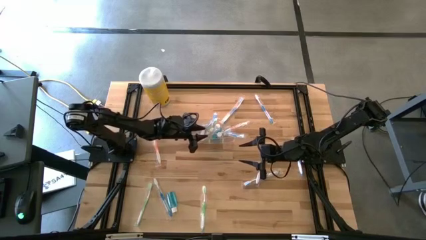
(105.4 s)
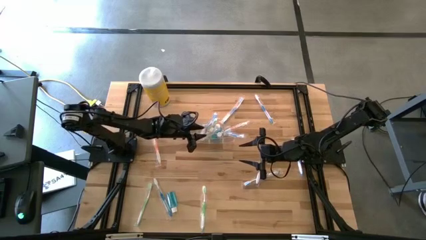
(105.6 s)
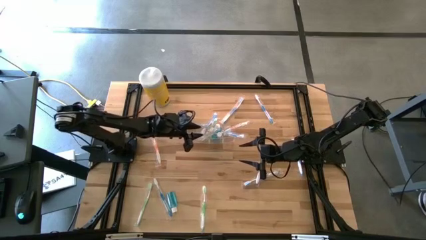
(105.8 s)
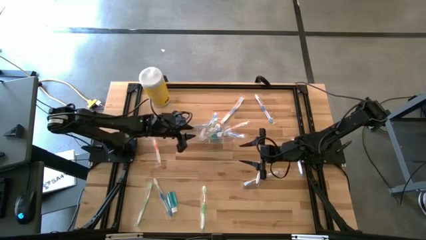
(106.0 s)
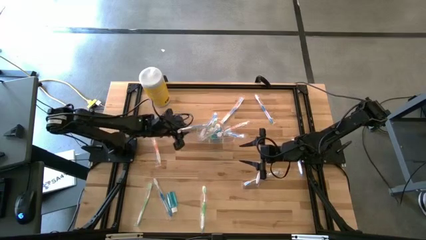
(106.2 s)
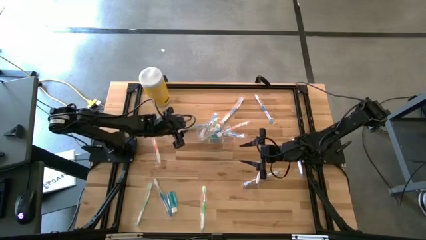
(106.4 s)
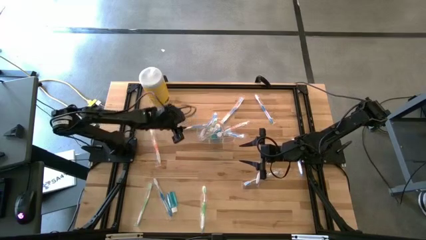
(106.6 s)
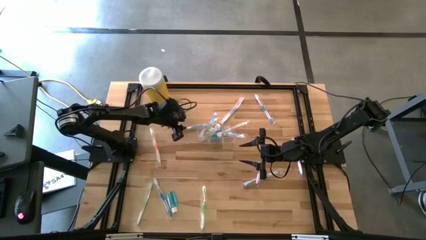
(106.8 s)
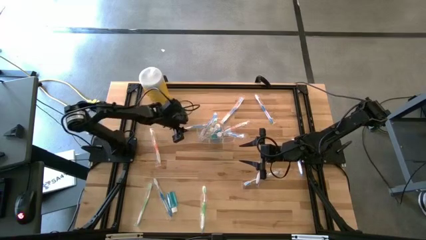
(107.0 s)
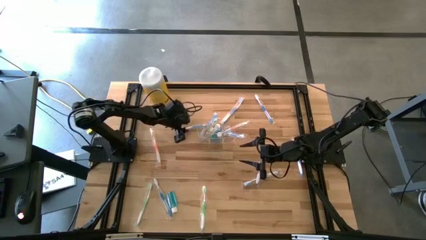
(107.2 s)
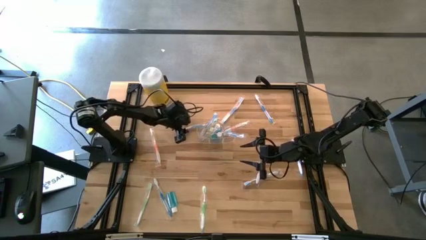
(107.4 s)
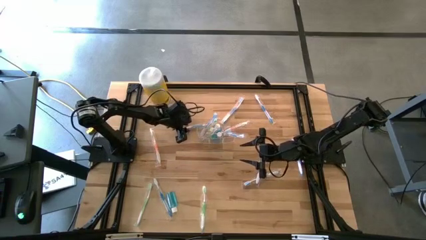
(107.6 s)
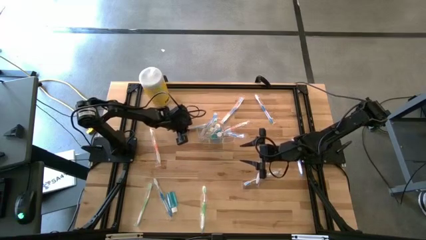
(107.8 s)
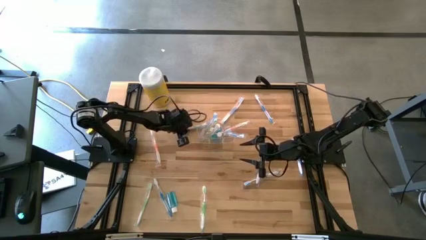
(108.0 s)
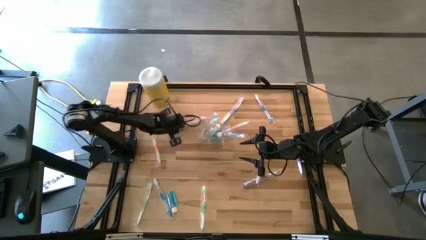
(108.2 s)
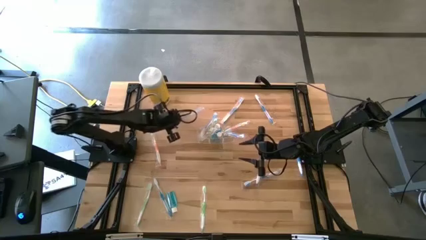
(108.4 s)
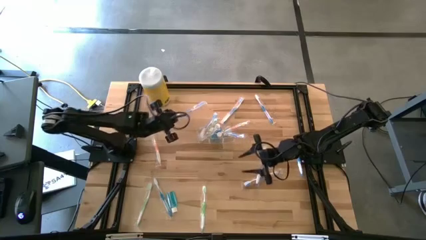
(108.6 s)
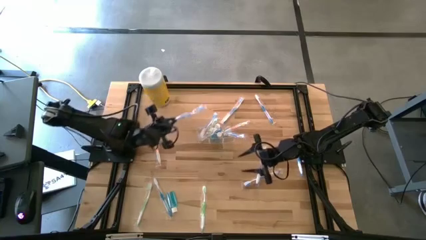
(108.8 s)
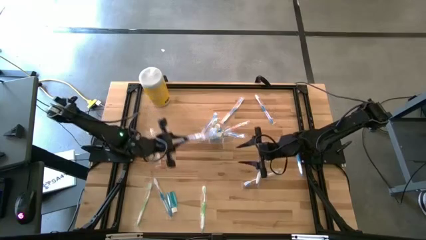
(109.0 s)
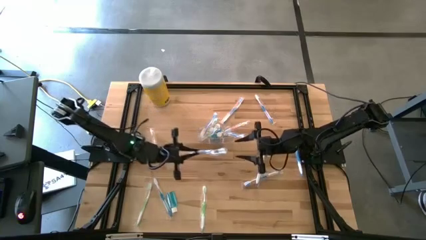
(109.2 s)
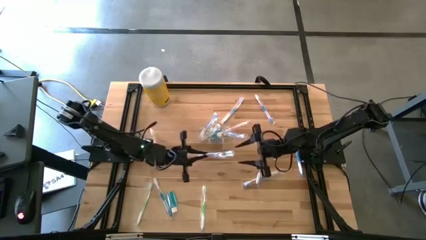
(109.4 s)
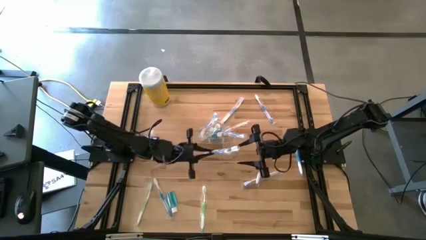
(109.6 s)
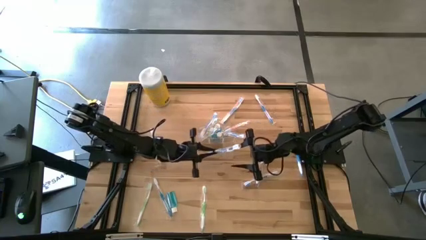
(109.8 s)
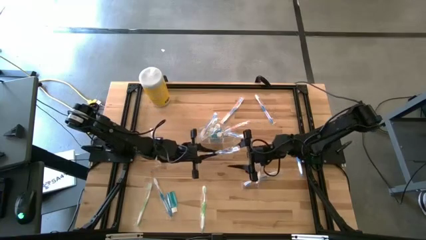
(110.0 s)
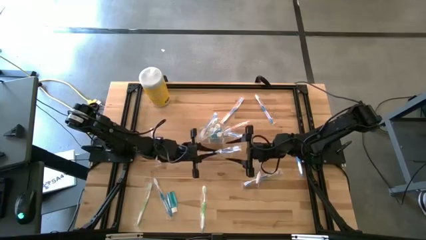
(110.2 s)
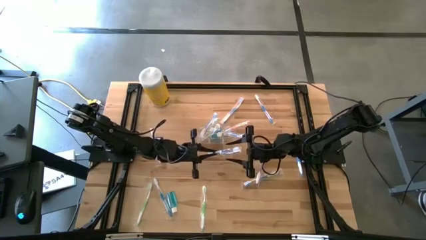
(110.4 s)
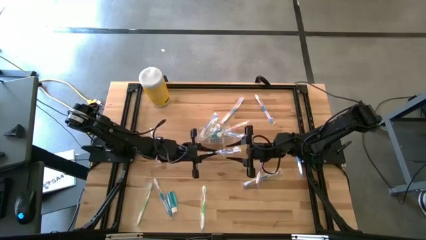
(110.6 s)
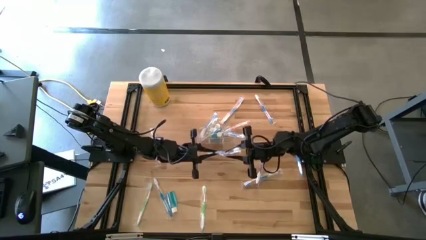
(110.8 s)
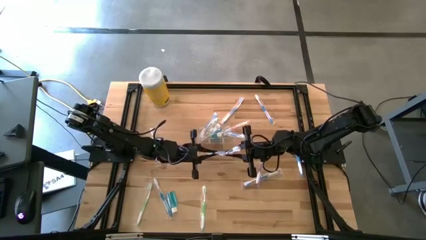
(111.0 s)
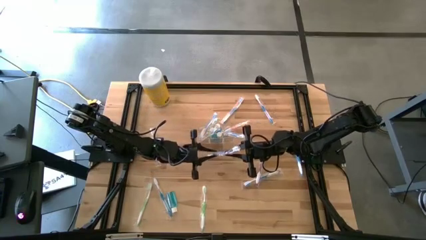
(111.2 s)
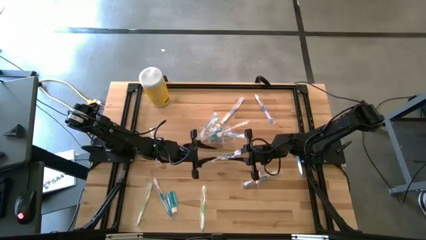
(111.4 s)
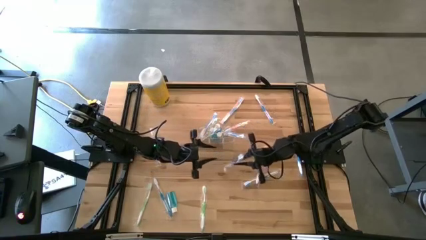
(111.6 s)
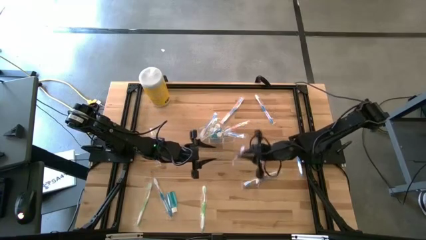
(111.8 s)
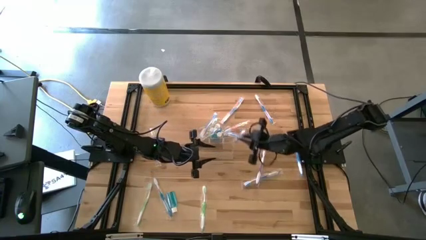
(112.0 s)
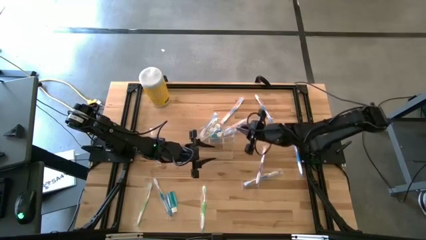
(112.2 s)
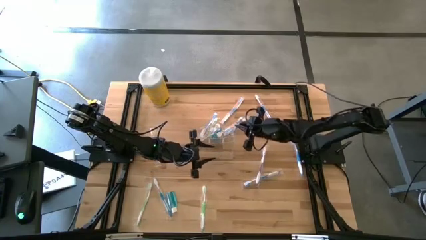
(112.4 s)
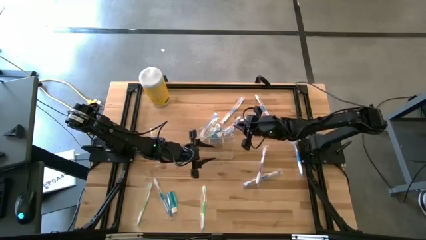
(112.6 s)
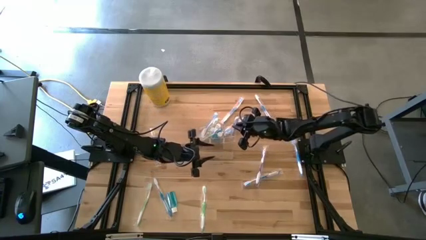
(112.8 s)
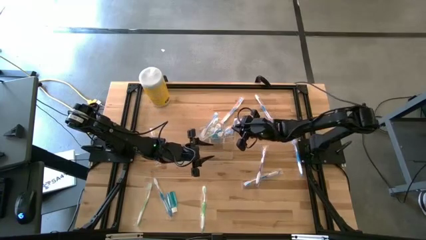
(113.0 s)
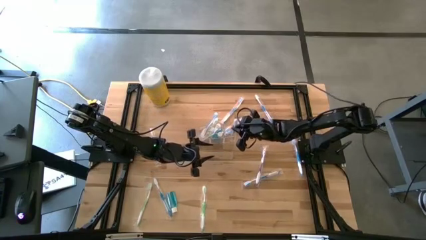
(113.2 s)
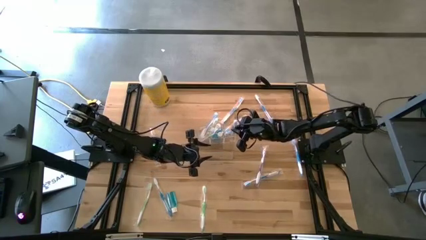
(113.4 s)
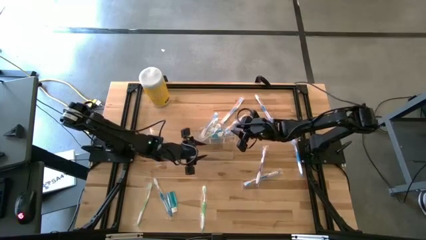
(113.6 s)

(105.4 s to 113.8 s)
Task: Pick & Place toothbrushing station
Put the blue toothbrush into the transparent organizer

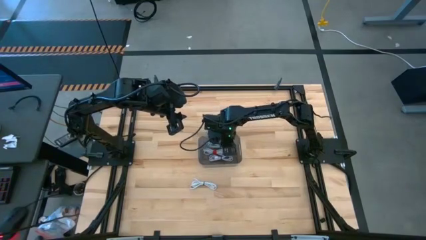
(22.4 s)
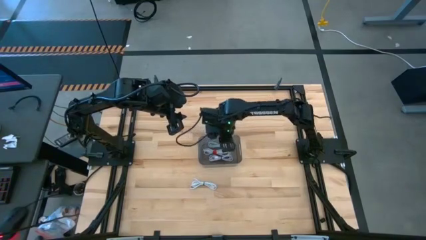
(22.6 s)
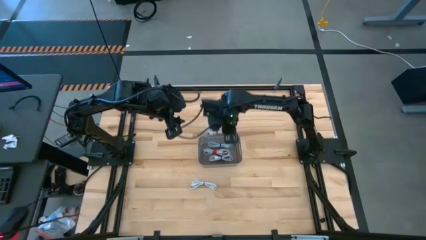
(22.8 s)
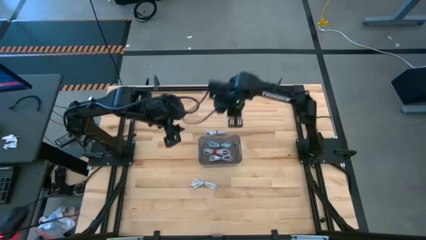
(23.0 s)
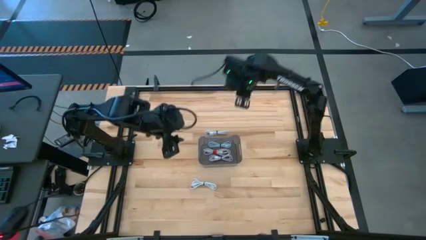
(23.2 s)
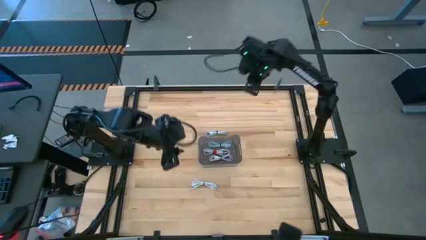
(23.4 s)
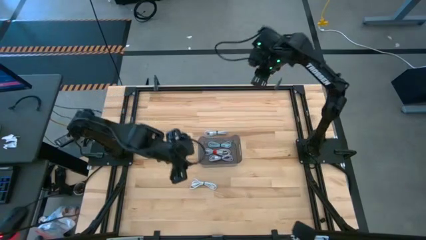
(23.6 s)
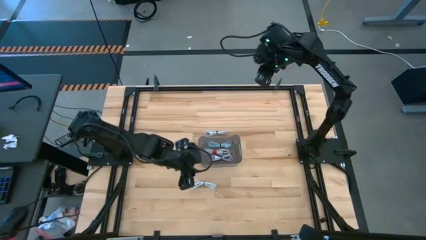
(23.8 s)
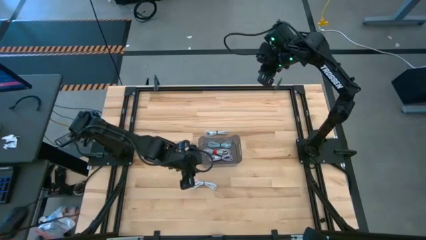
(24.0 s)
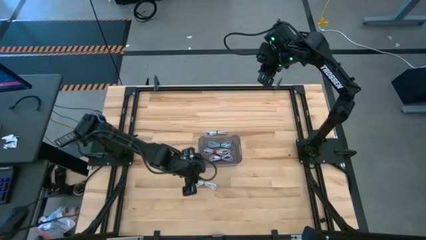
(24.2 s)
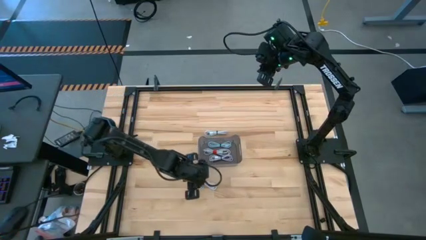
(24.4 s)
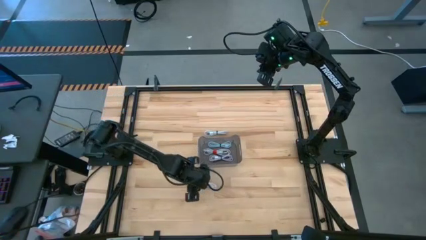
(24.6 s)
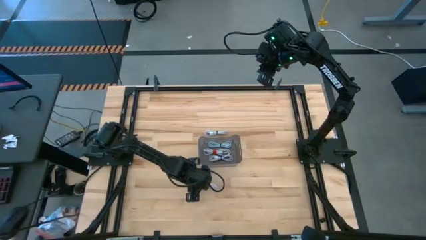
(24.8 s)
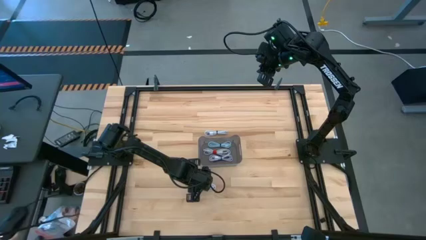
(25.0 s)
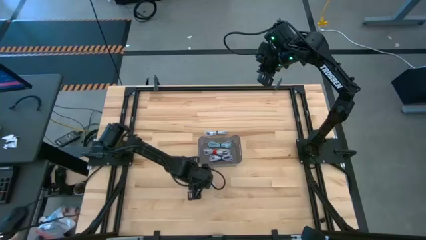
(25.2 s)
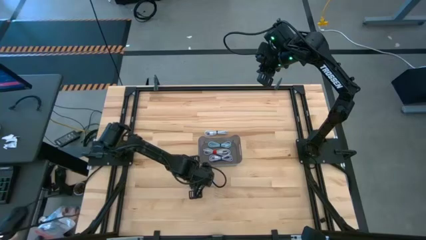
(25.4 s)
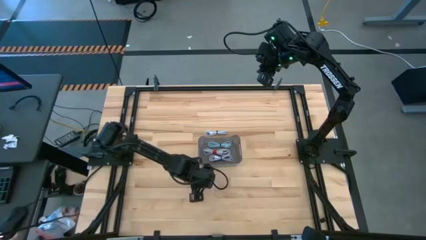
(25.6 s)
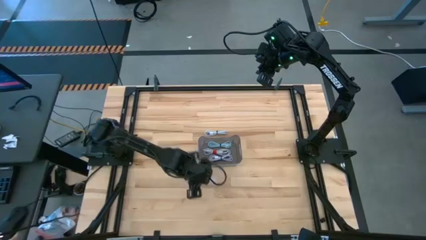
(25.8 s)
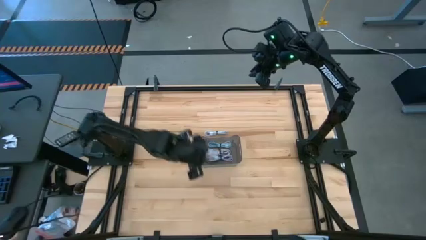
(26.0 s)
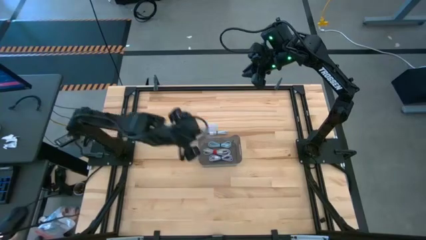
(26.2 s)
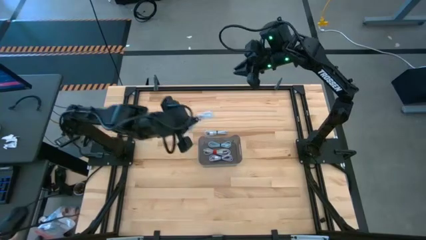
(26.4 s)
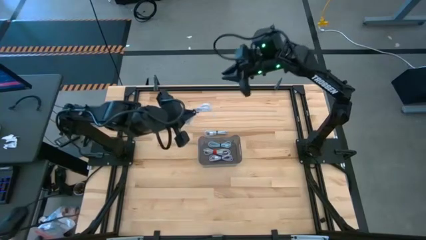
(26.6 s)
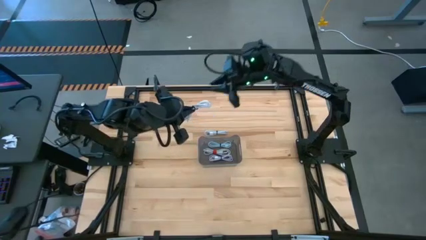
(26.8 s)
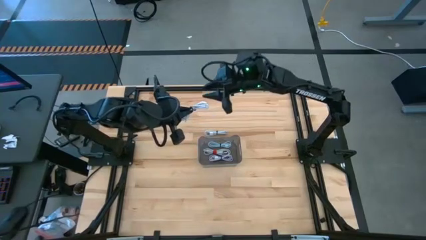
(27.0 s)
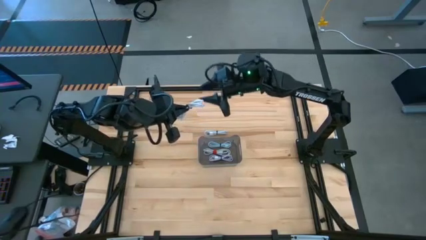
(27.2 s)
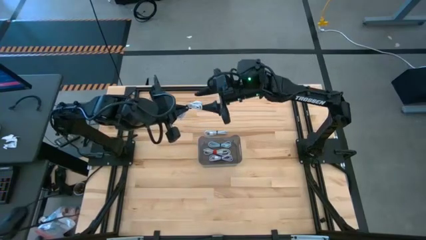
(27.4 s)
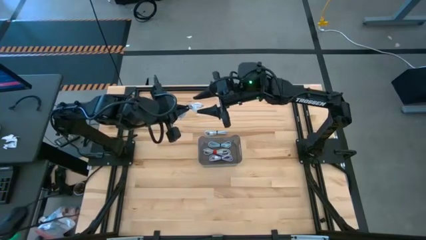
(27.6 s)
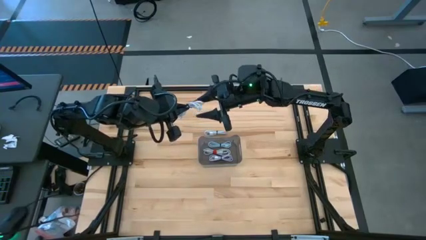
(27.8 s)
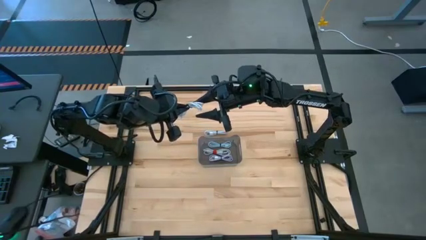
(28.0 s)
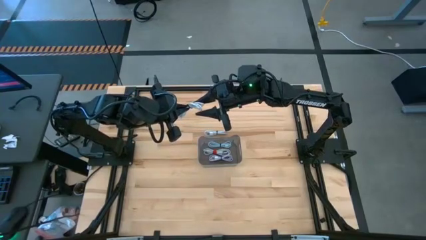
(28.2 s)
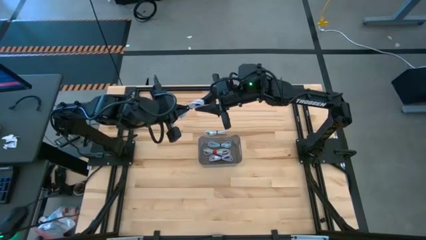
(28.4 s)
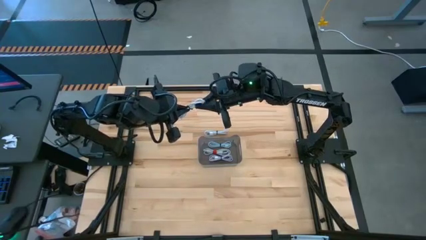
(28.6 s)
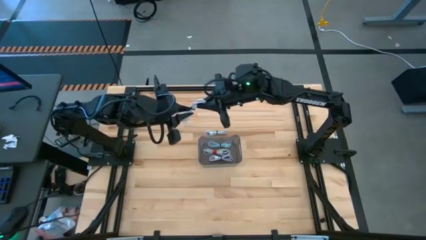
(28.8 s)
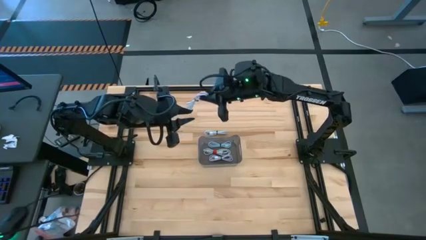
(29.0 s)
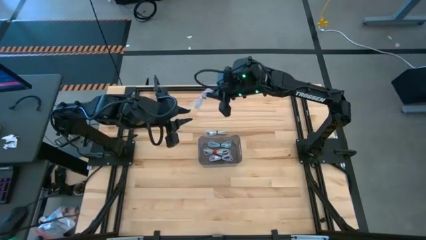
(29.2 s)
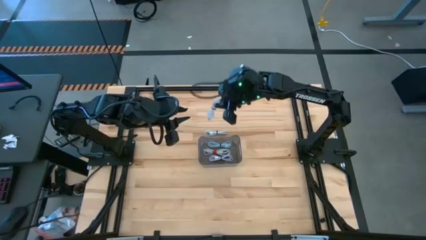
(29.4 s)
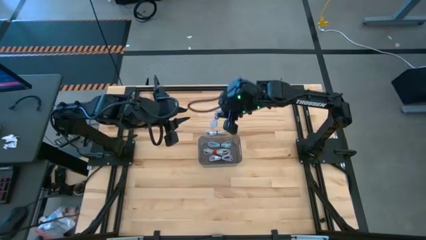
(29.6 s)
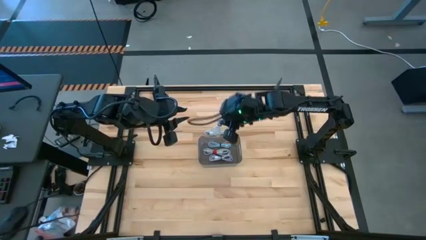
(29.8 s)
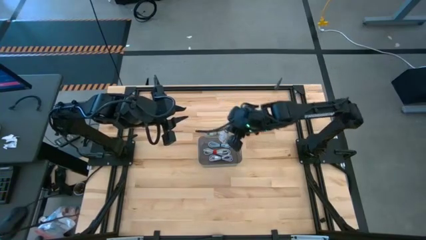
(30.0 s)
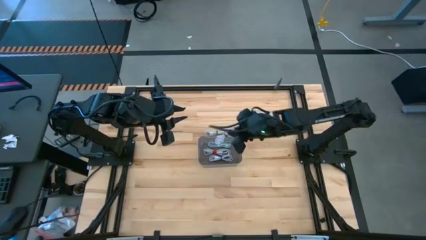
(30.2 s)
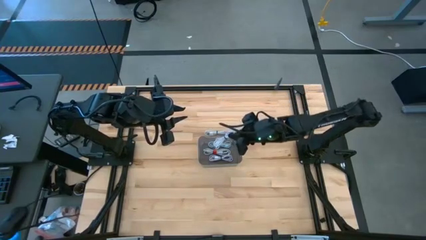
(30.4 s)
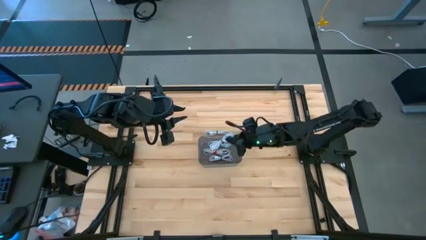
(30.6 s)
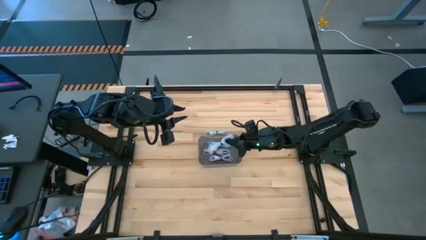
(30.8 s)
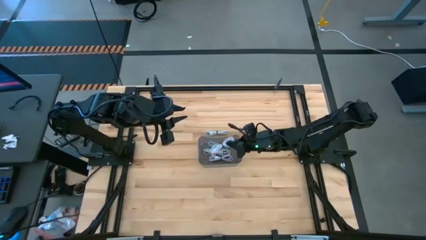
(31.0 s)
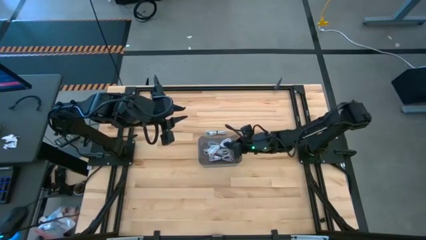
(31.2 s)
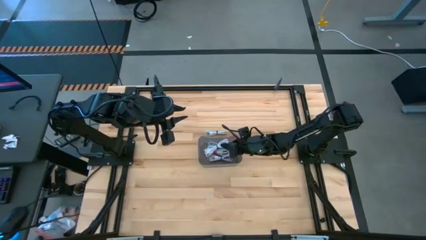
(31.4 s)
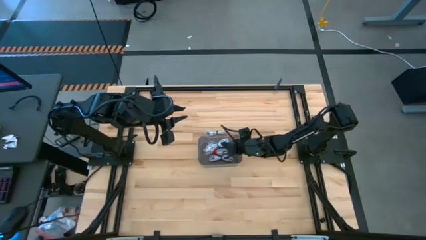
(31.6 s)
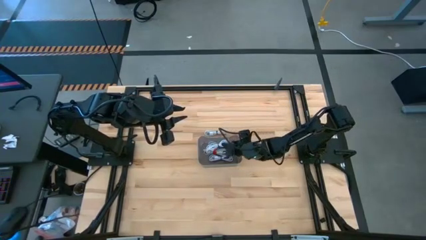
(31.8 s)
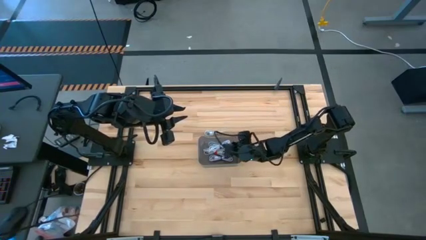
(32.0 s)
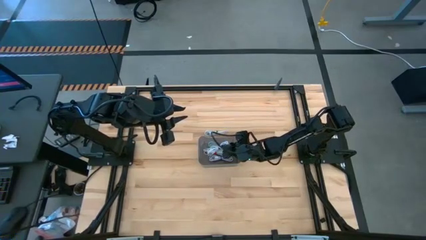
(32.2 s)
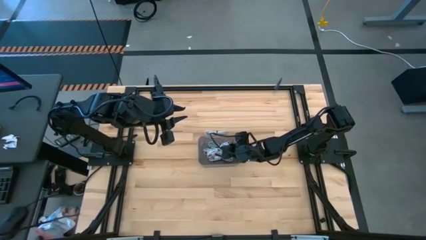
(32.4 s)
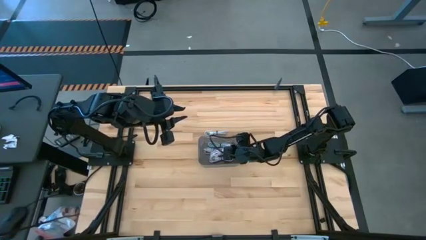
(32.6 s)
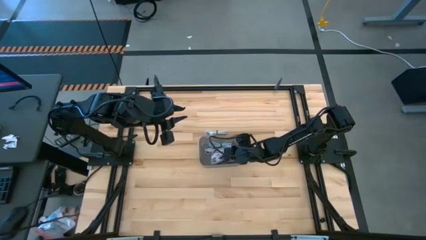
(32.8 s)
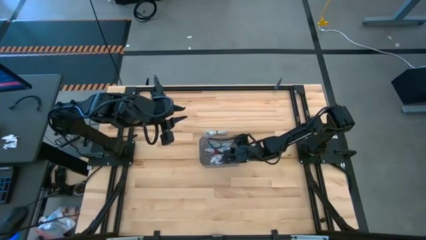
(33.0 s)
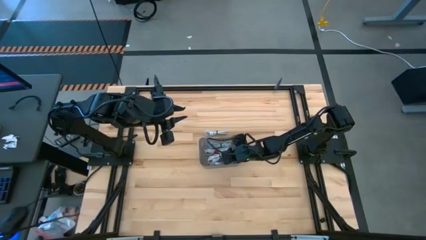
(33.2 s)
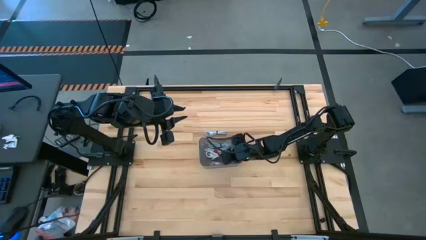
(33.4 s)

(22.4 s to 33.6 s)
Task: Pick and place USB-C Cables
Put the bottom white charger cable in the black bin
